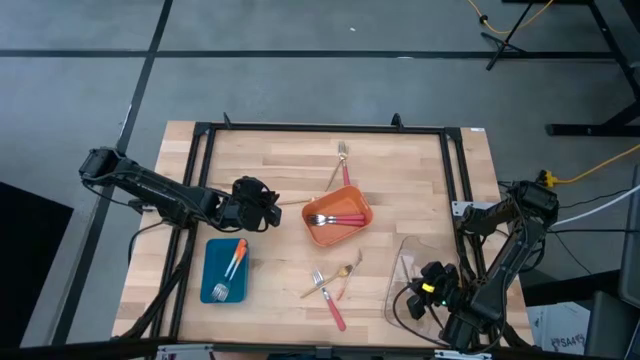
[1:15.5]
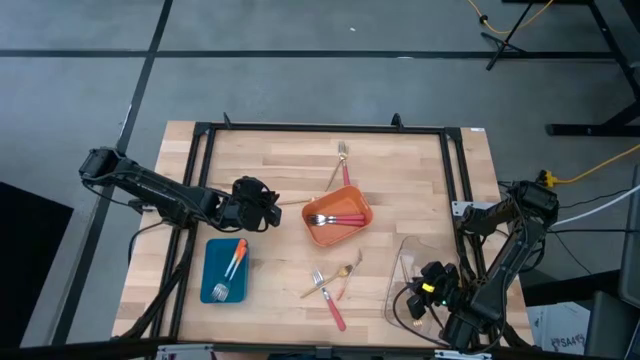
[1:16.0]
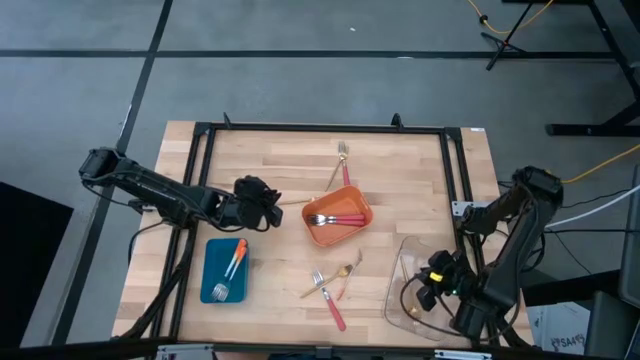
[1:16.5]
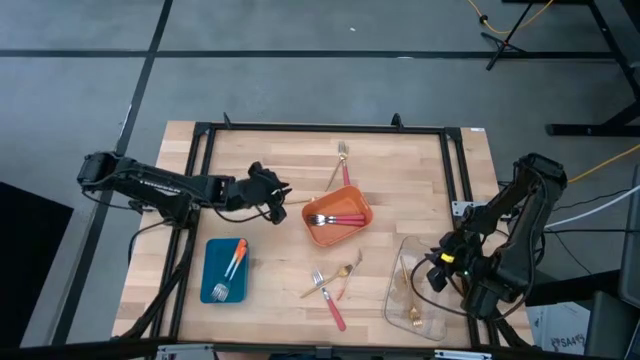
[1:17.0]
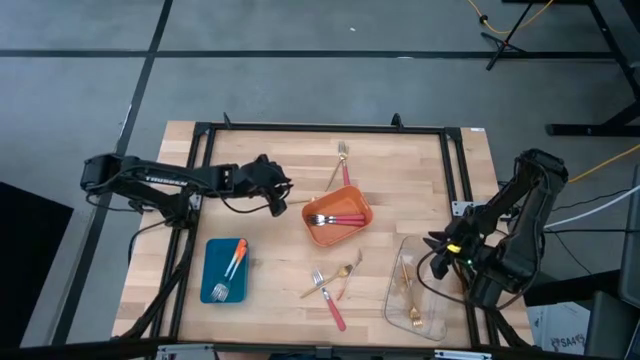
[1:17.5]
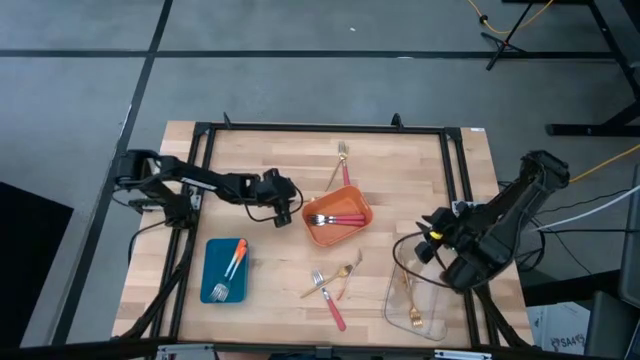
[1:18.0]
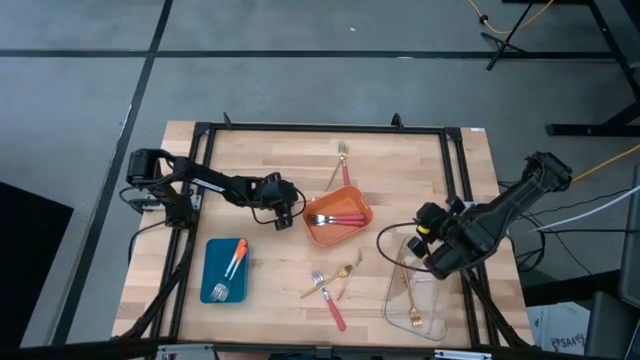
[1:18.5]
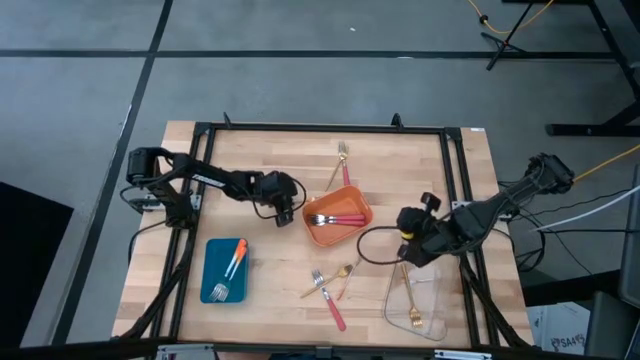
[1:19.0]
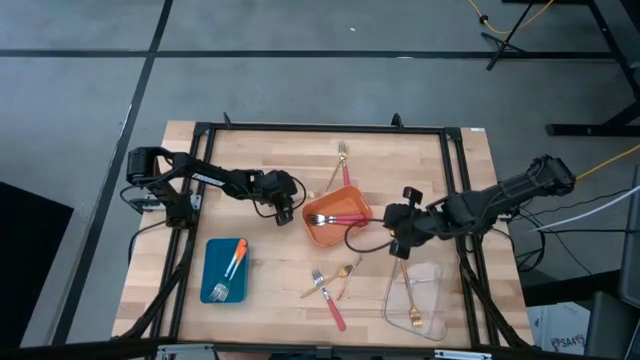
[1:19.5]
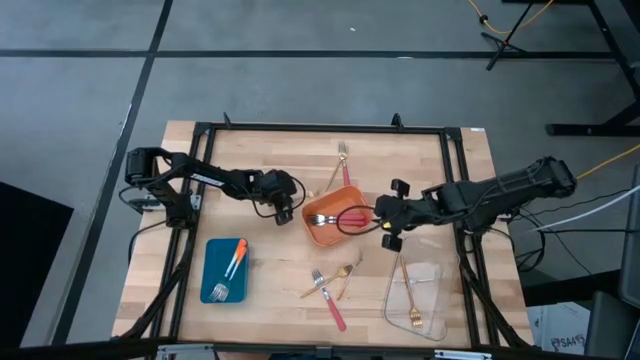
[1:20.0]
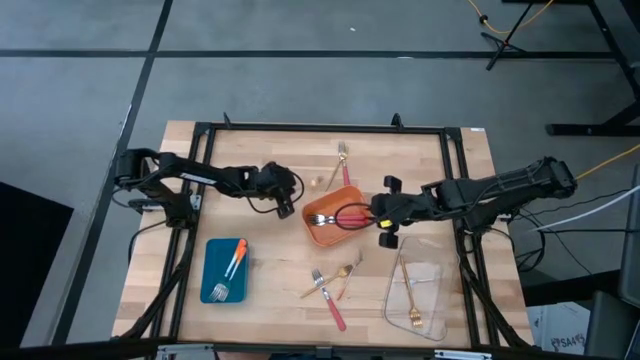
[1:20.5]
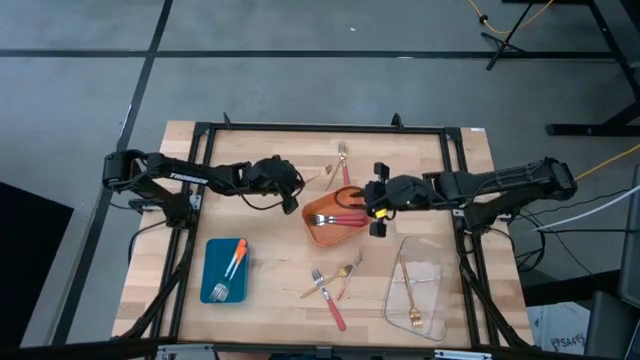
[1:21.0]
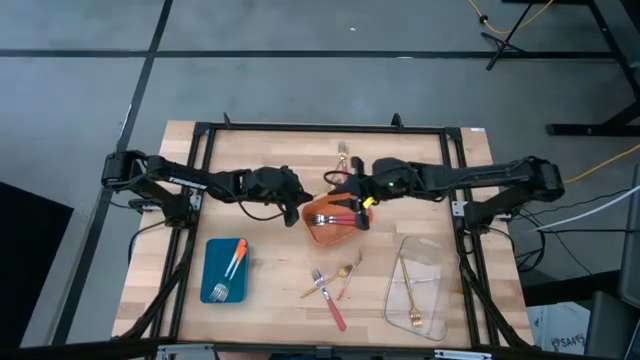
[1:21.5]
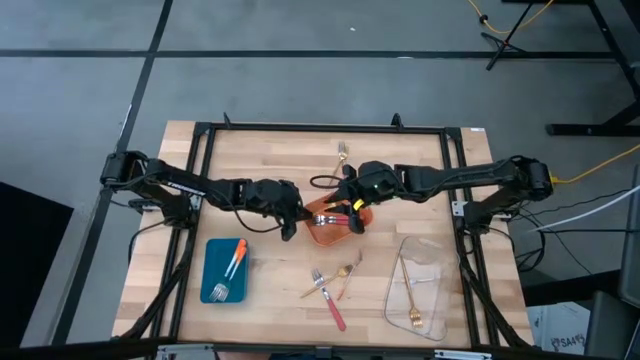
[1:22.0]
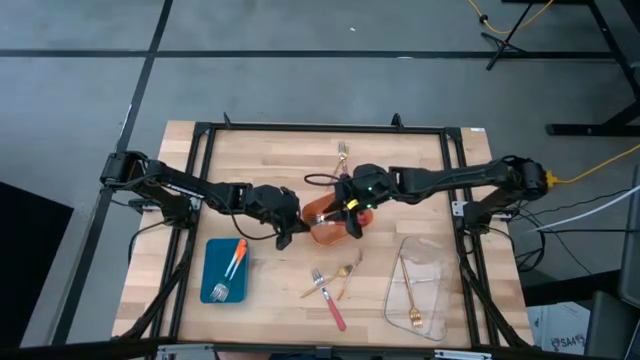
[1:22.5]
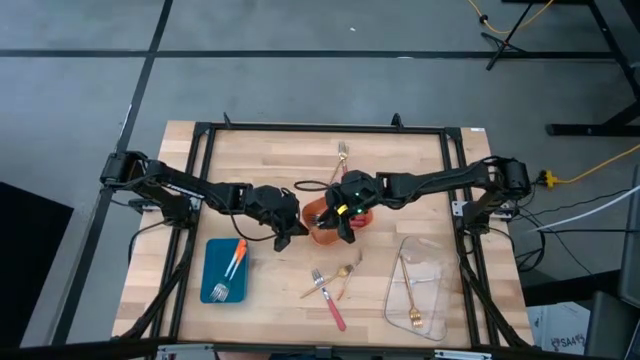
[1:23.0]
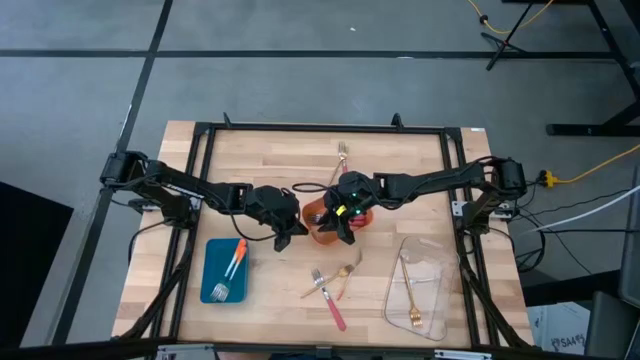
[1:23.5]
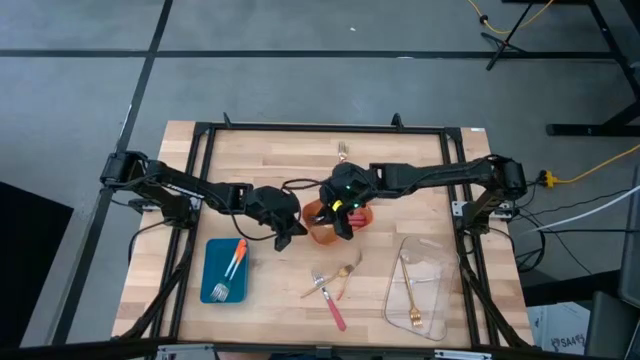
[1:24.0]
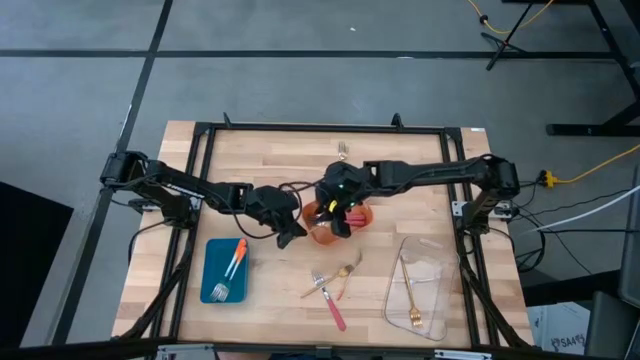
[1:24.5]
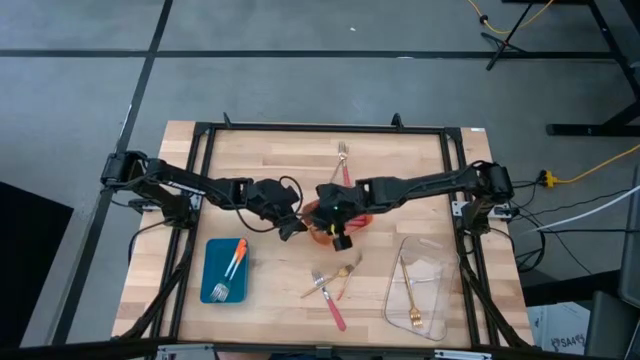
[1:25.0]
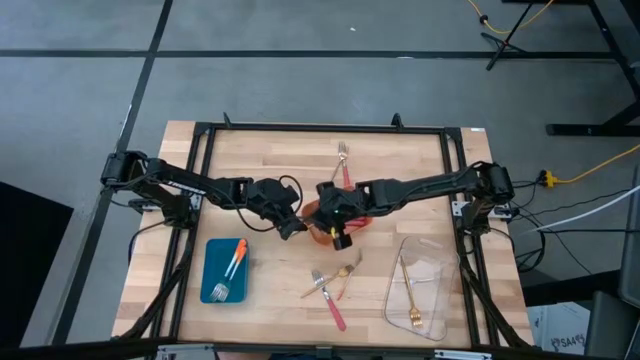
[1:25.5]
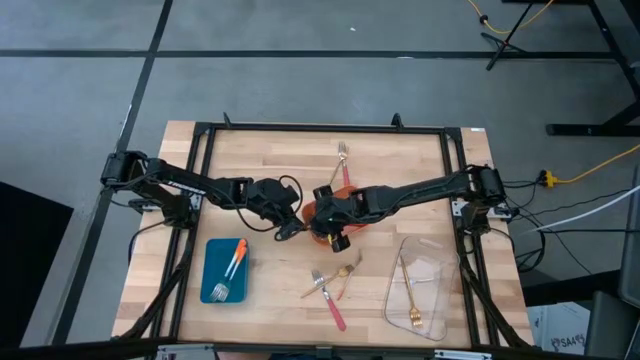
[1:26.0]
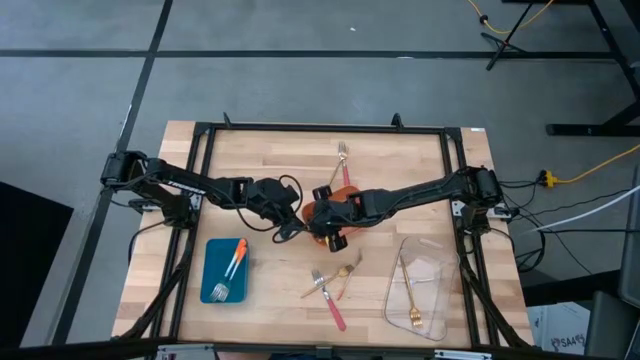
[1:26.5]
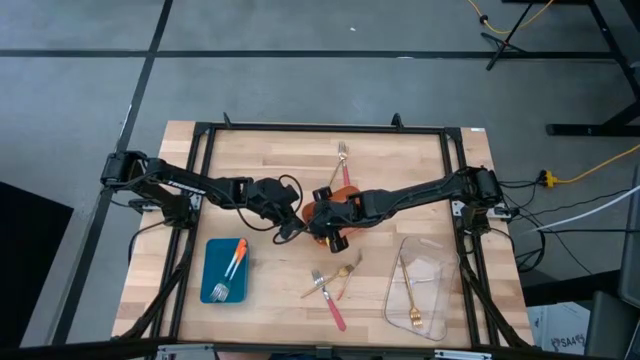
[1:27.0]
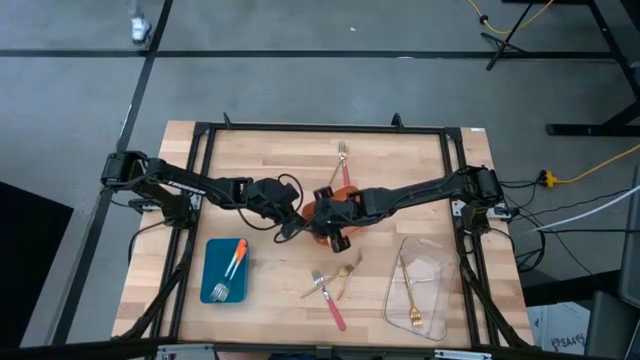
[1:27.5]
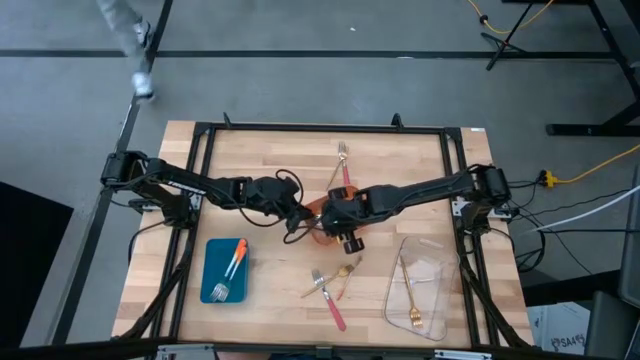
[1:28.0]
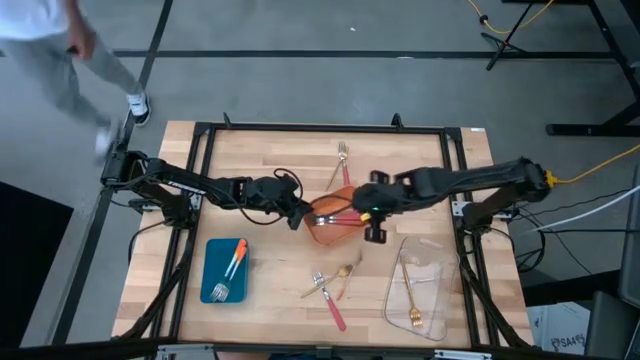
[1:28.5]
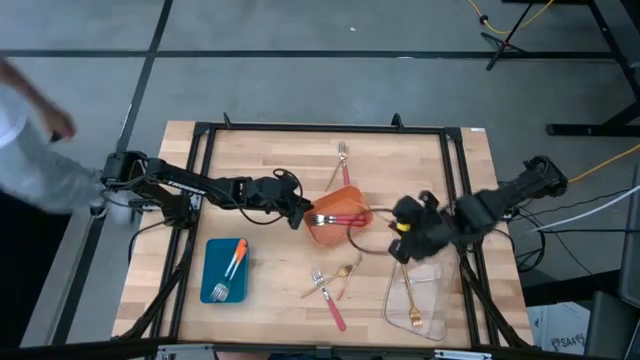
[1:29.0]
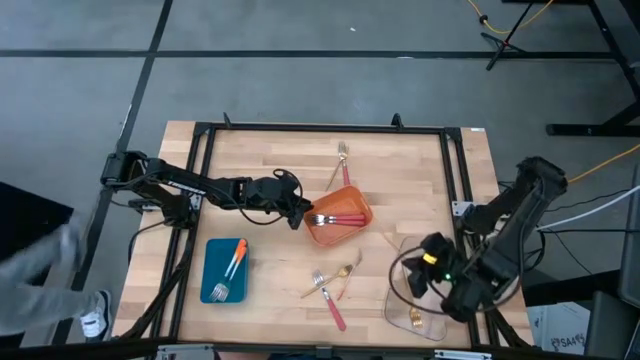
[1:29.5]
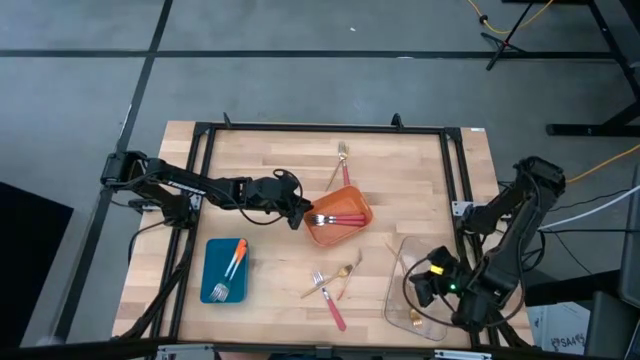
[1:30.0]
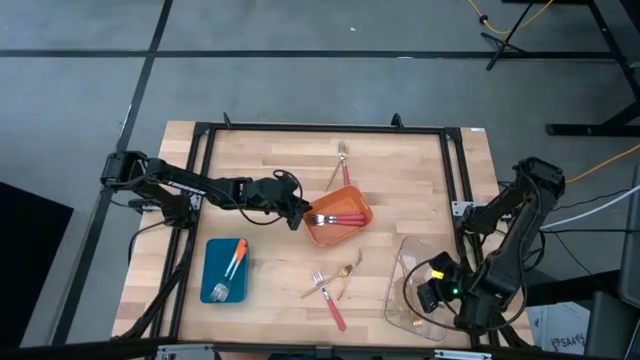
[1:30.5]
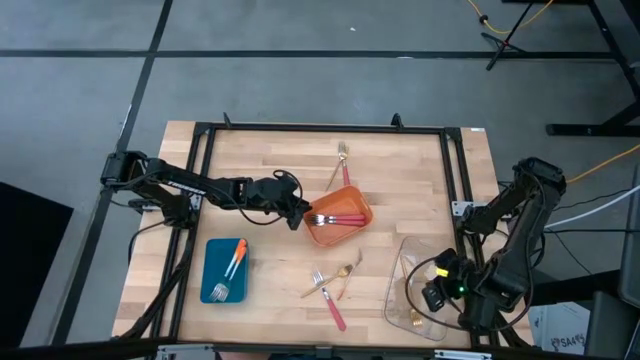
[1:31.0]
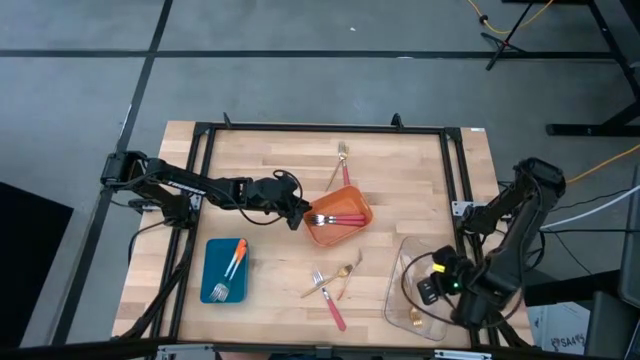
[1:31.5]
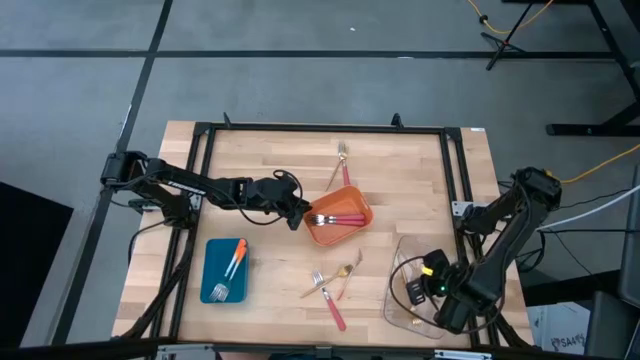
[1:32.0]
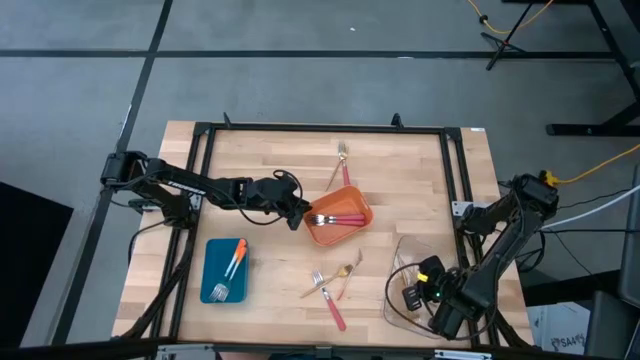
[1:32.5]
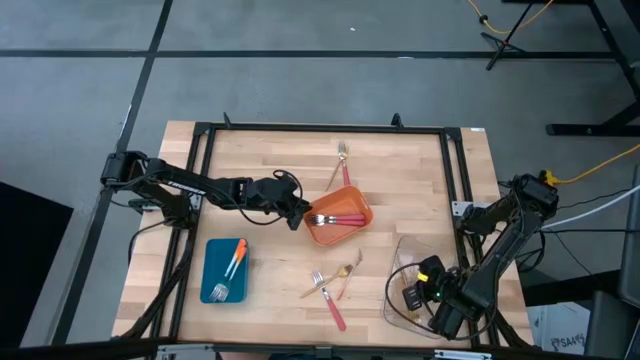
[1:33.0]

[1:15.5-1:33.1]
Task: Sort silverware by color (type)
Put the gold fork into the transparent bin

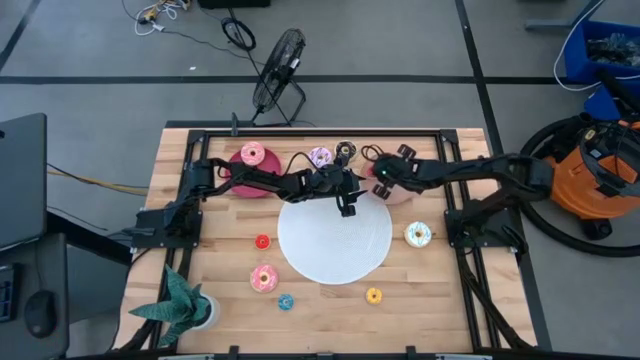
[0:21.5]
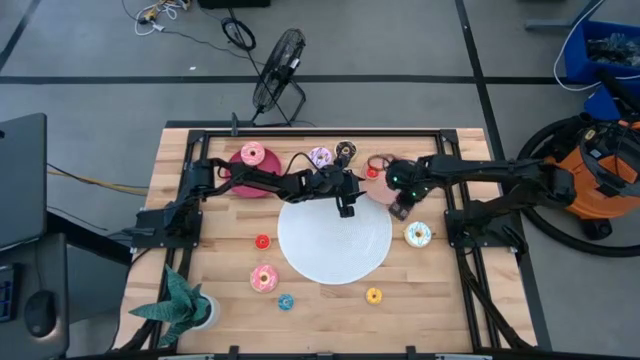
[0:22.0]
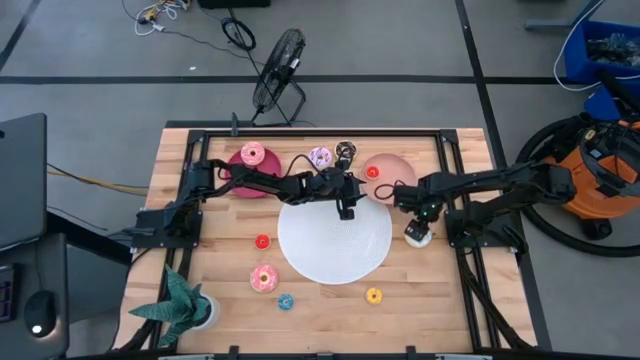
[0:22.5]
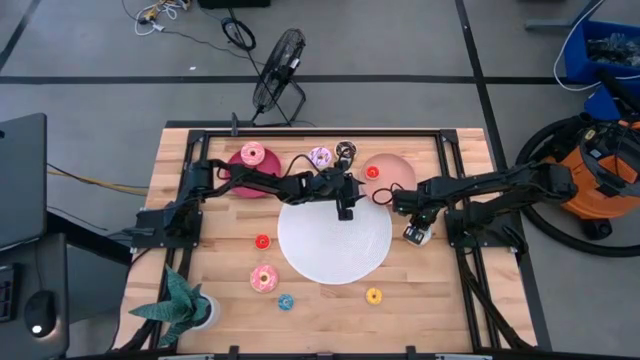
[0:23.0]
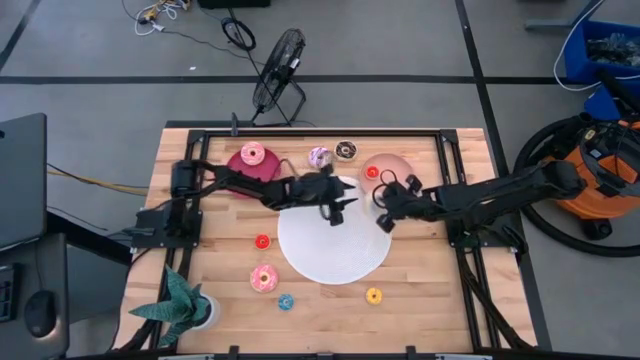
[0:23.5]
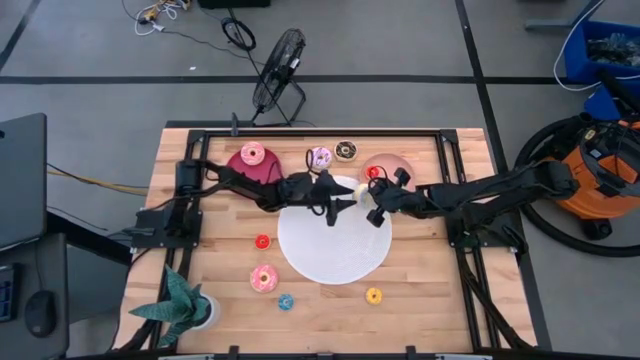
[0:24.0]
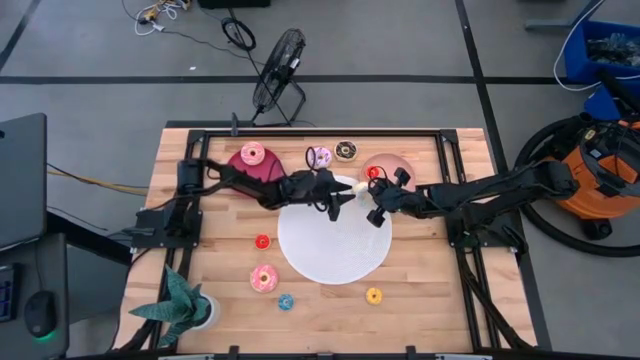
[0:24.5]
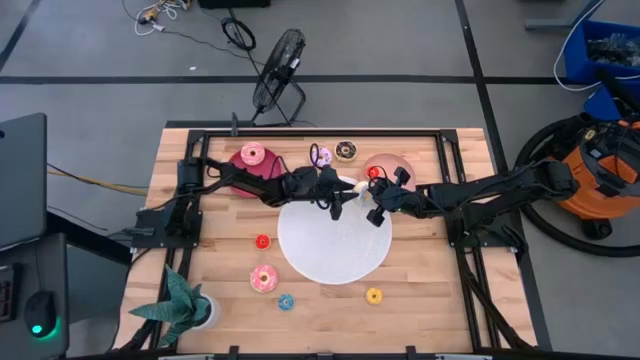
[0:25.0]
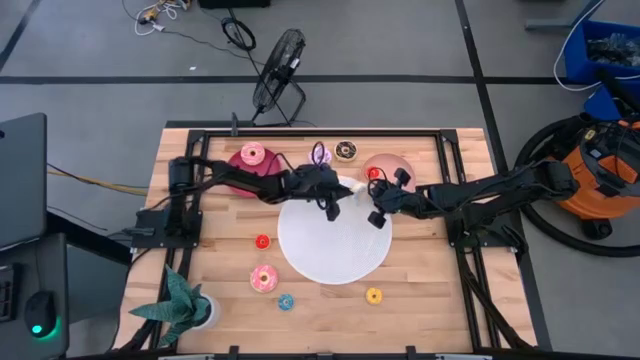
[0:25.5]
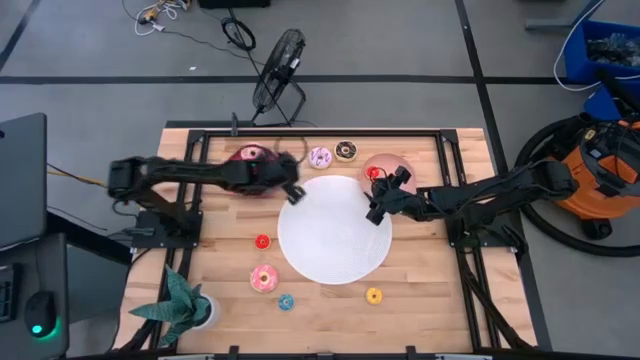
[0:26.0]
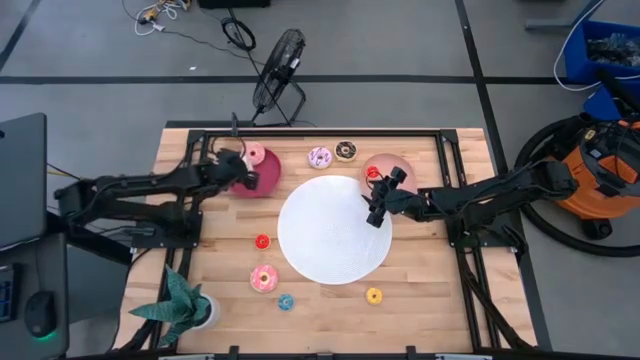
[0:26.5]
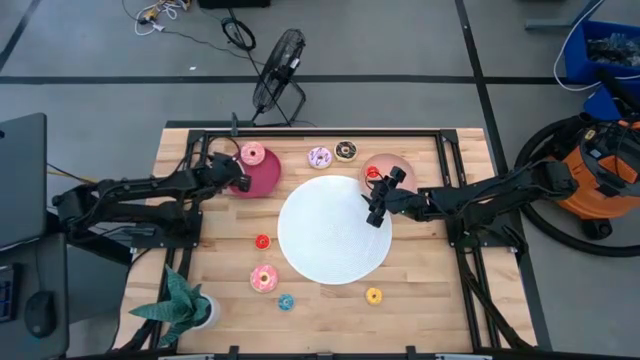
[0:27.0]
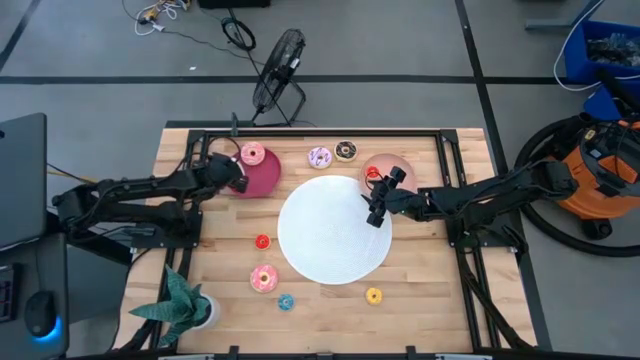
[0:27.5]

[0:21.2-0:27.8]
Task: Pick & Place donuts
Put the big blue donut on the dark pink plate
